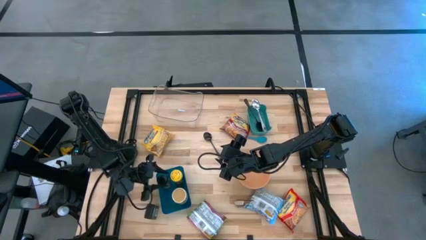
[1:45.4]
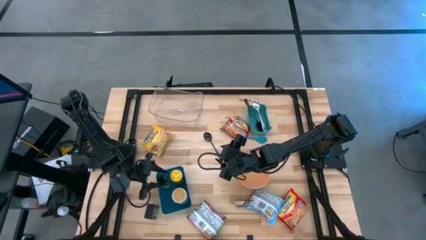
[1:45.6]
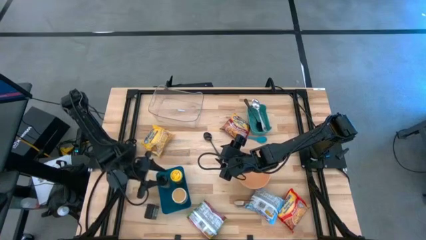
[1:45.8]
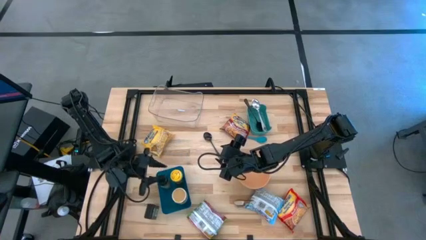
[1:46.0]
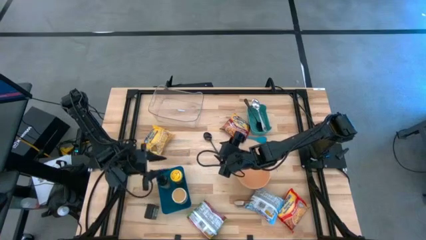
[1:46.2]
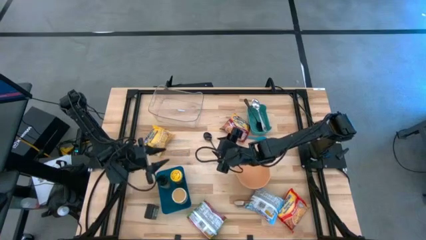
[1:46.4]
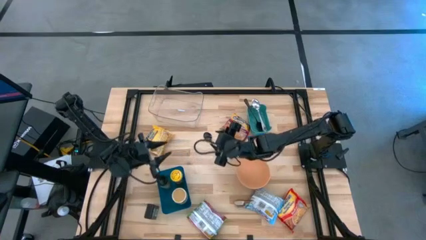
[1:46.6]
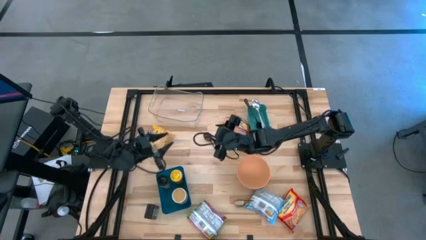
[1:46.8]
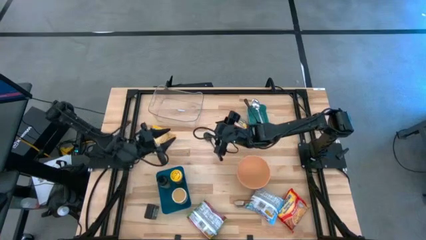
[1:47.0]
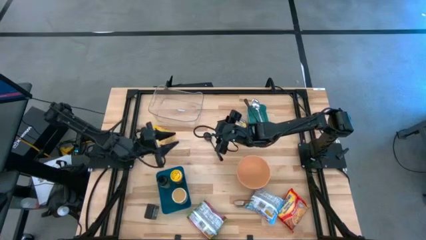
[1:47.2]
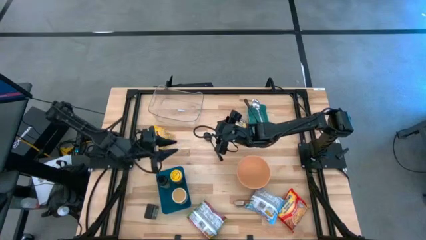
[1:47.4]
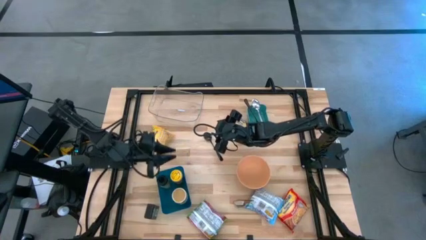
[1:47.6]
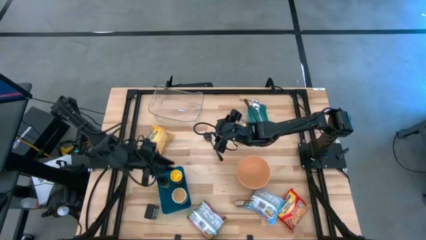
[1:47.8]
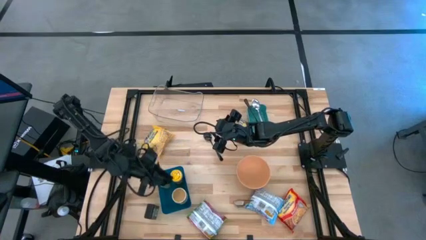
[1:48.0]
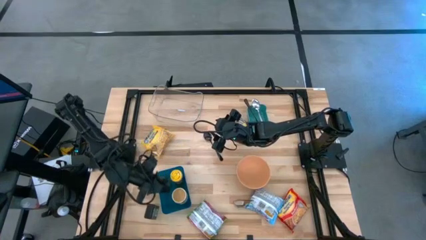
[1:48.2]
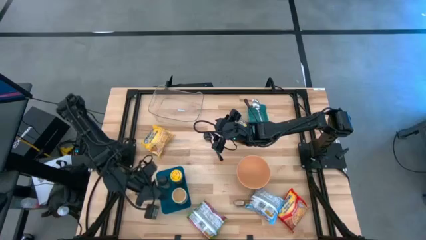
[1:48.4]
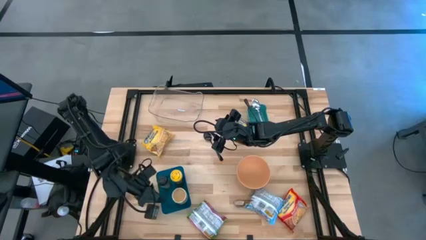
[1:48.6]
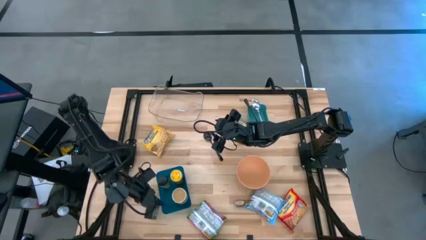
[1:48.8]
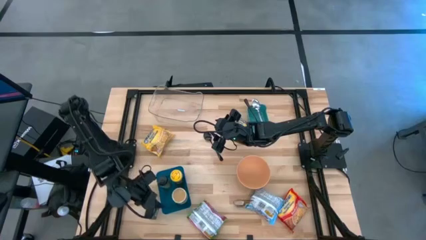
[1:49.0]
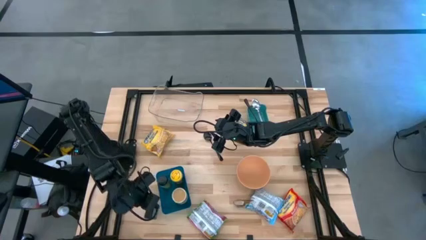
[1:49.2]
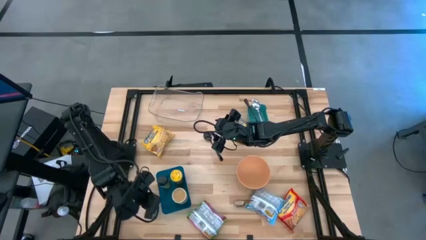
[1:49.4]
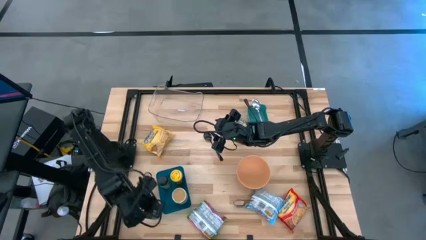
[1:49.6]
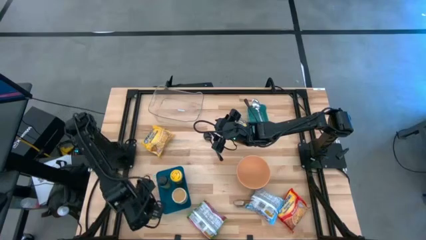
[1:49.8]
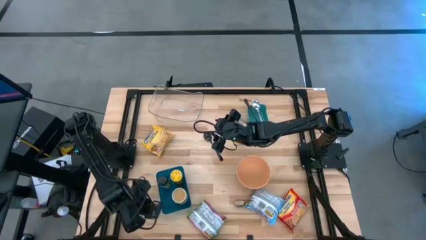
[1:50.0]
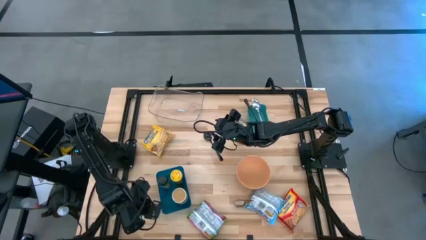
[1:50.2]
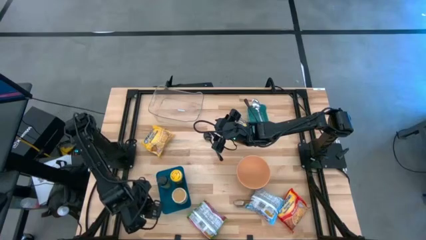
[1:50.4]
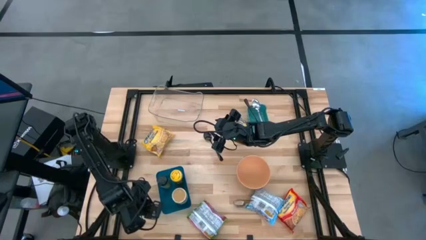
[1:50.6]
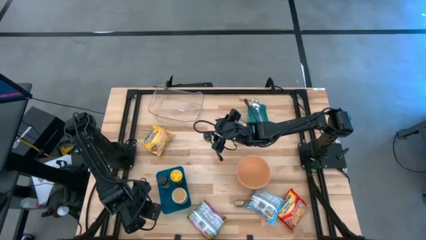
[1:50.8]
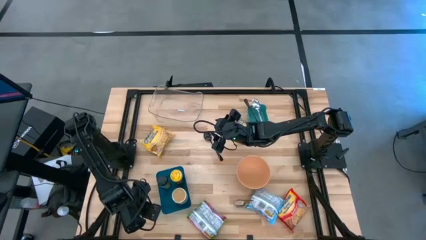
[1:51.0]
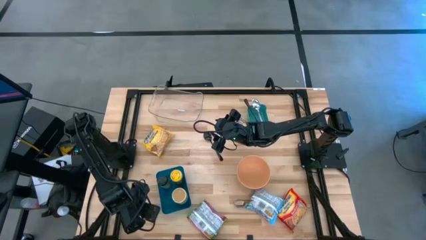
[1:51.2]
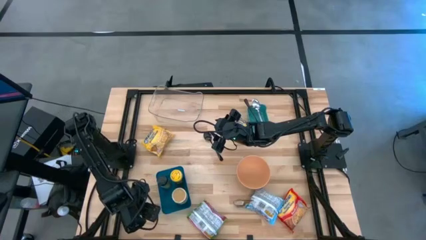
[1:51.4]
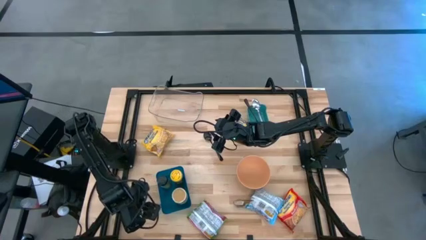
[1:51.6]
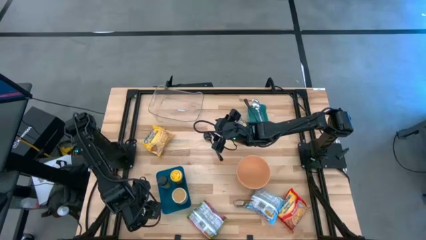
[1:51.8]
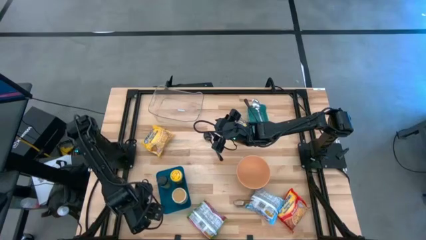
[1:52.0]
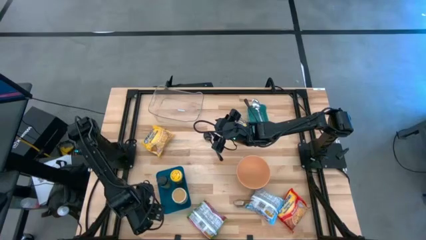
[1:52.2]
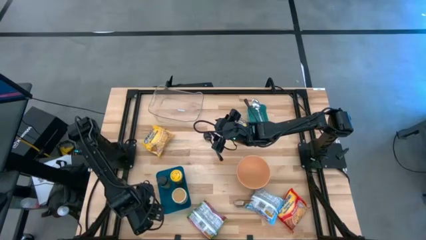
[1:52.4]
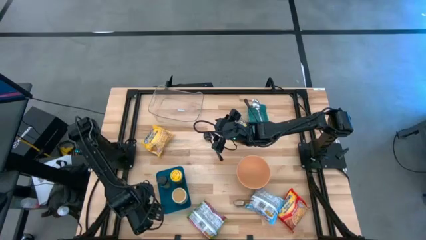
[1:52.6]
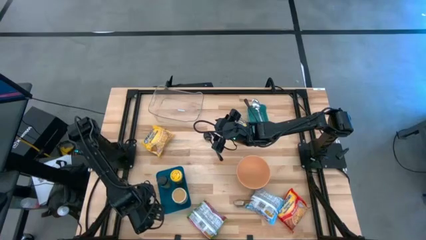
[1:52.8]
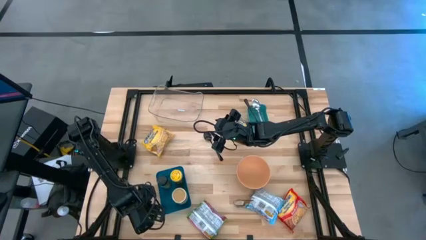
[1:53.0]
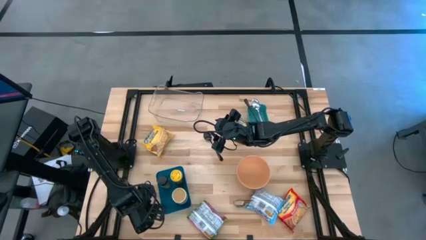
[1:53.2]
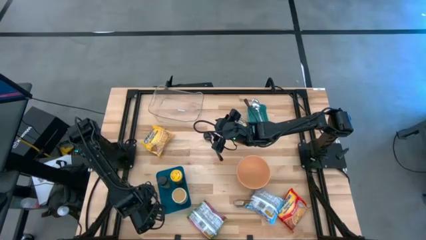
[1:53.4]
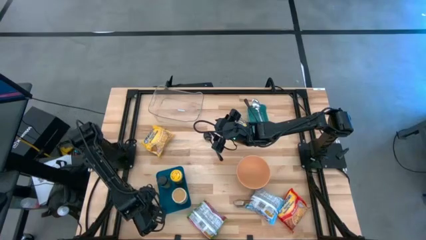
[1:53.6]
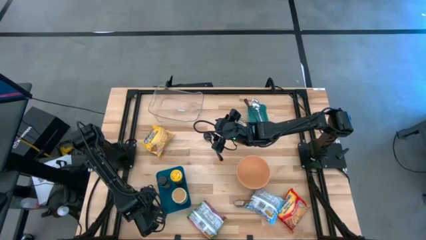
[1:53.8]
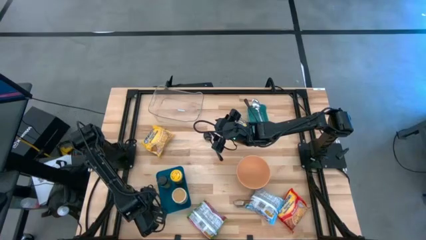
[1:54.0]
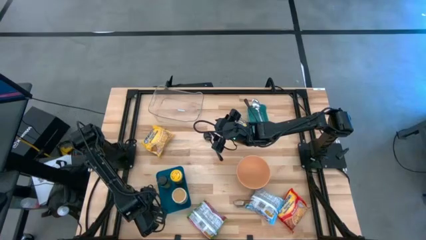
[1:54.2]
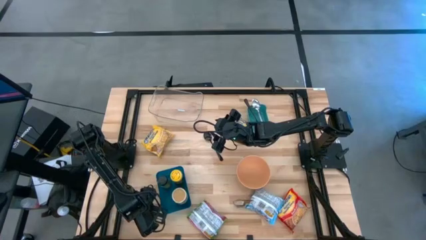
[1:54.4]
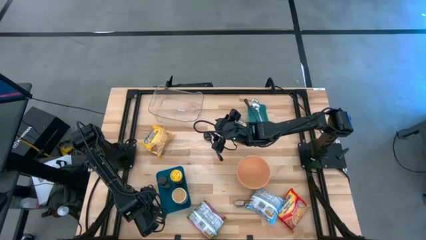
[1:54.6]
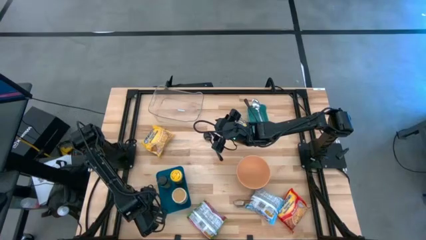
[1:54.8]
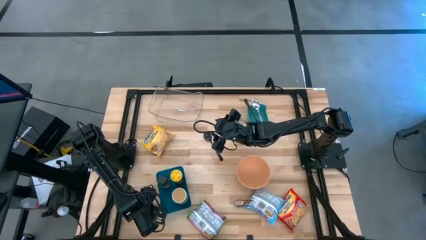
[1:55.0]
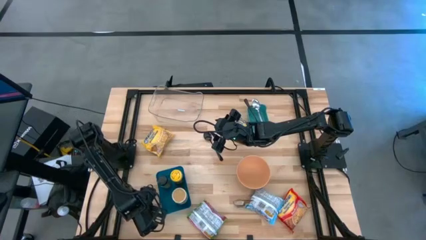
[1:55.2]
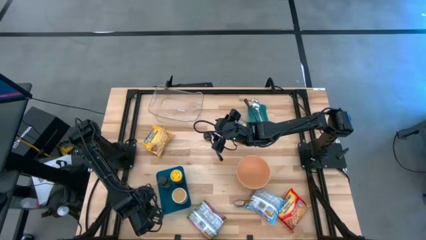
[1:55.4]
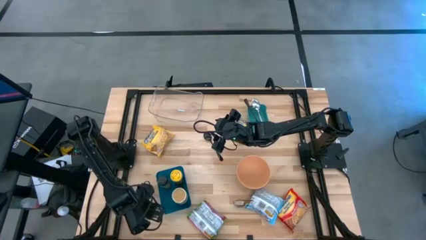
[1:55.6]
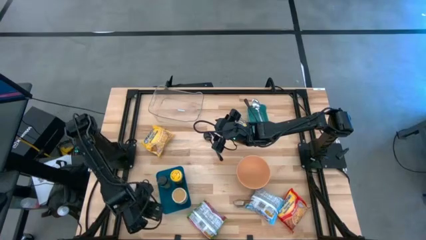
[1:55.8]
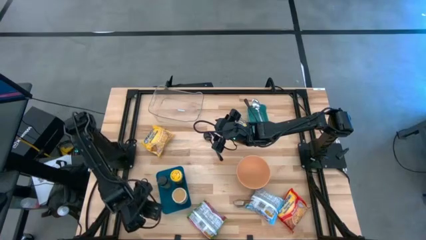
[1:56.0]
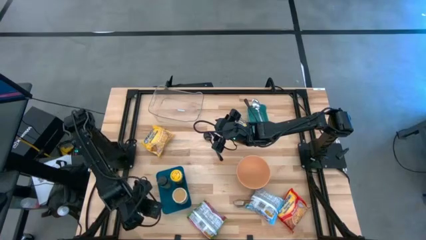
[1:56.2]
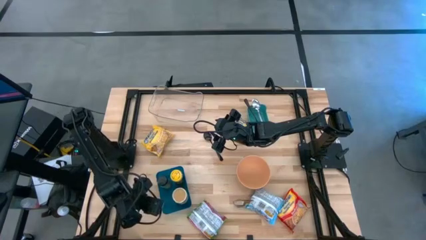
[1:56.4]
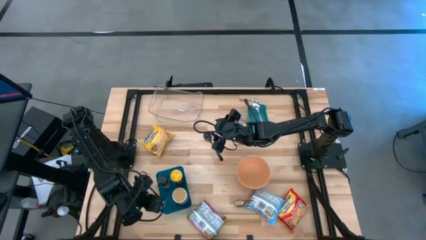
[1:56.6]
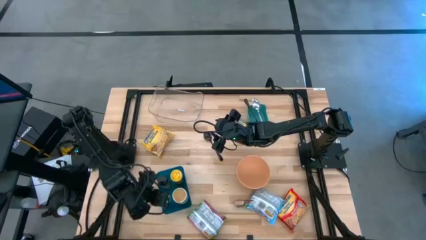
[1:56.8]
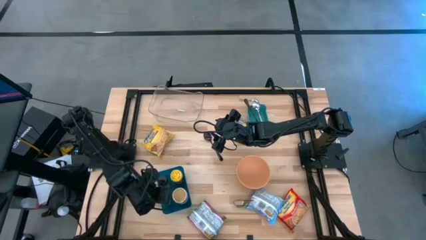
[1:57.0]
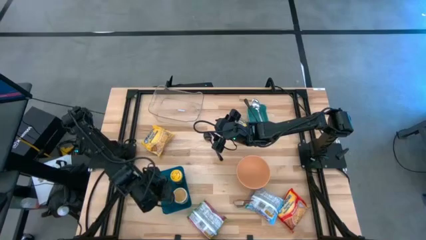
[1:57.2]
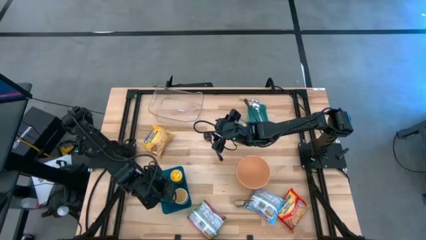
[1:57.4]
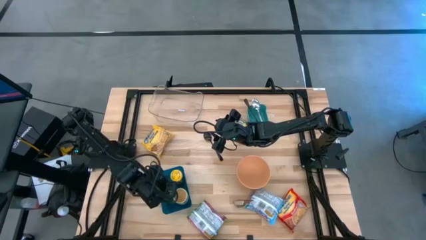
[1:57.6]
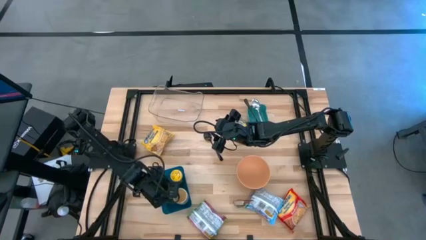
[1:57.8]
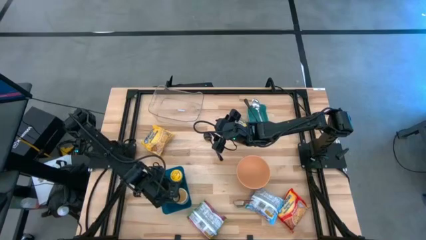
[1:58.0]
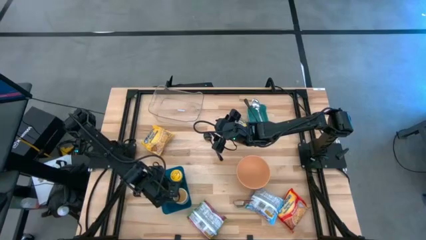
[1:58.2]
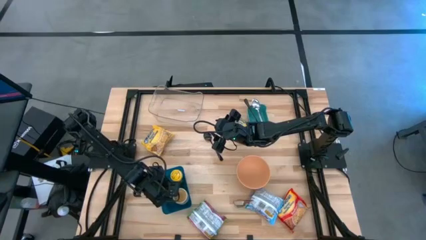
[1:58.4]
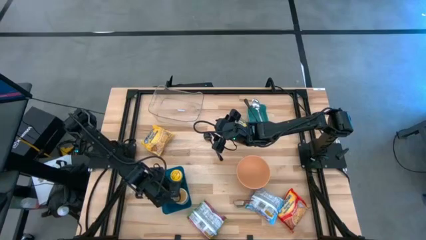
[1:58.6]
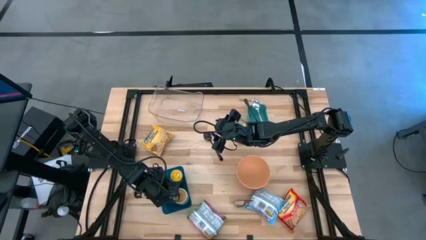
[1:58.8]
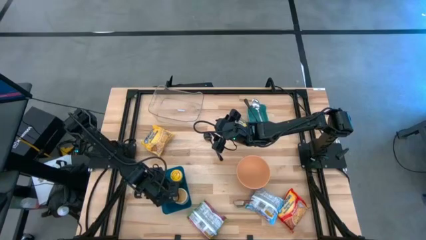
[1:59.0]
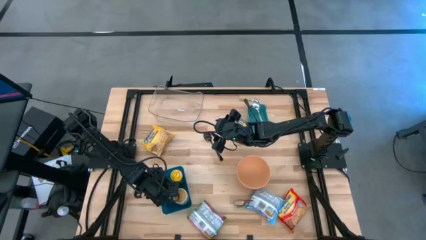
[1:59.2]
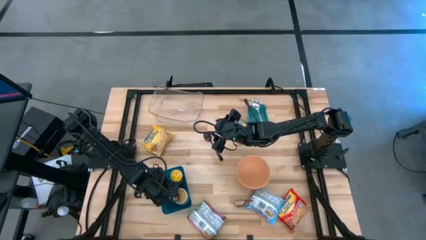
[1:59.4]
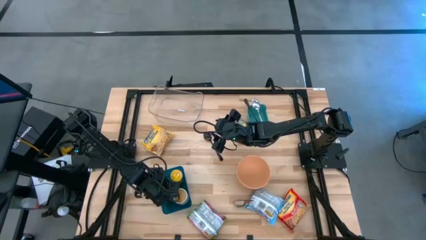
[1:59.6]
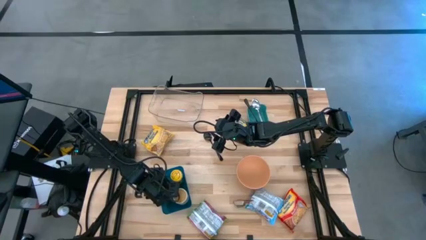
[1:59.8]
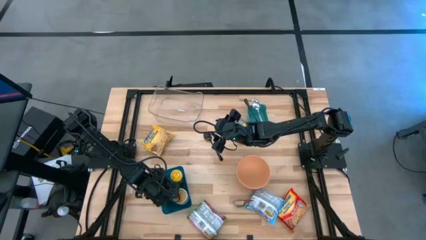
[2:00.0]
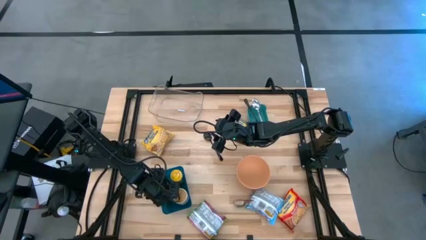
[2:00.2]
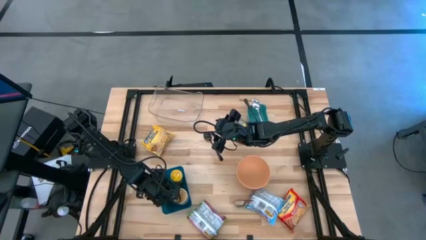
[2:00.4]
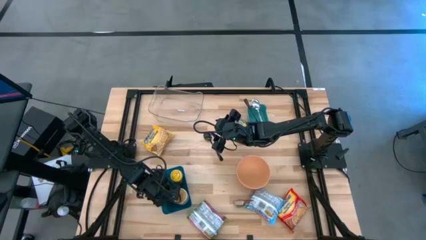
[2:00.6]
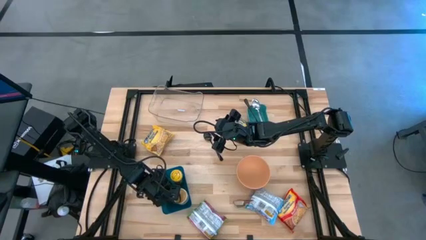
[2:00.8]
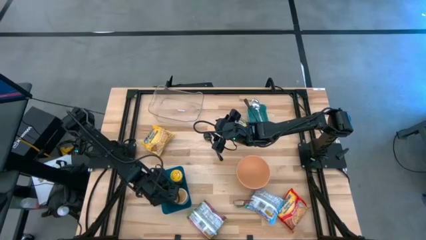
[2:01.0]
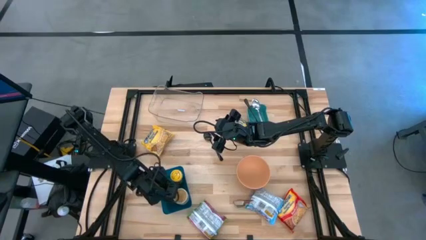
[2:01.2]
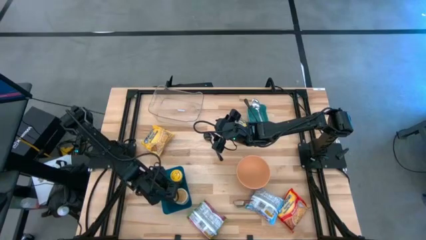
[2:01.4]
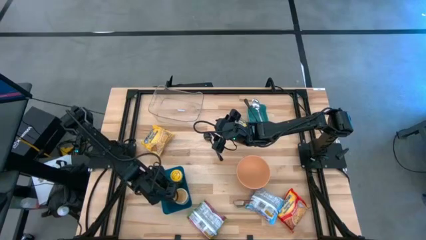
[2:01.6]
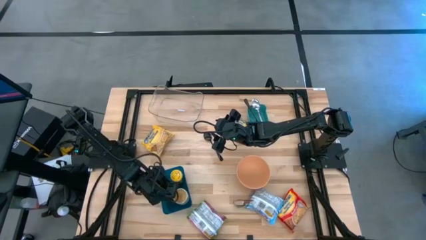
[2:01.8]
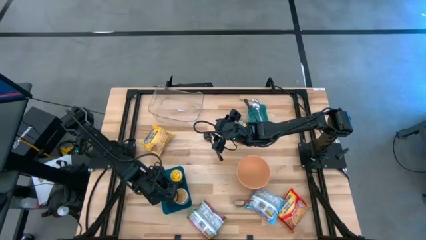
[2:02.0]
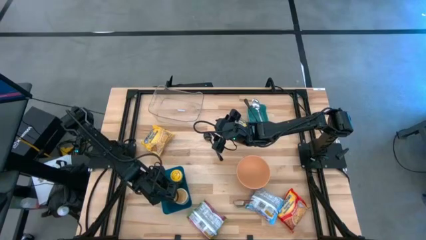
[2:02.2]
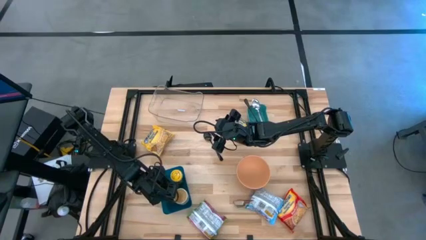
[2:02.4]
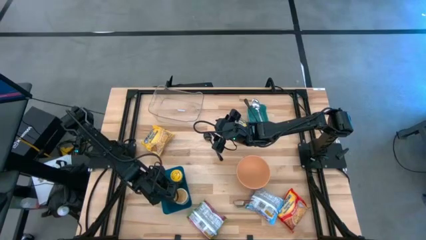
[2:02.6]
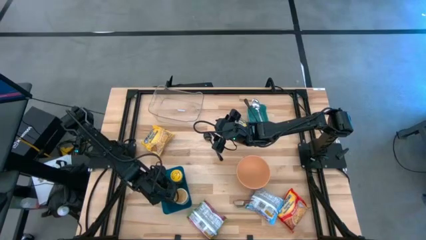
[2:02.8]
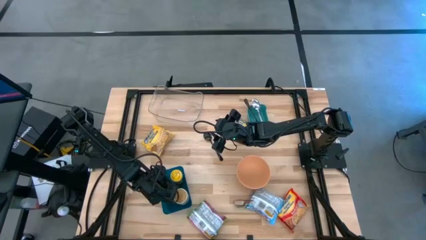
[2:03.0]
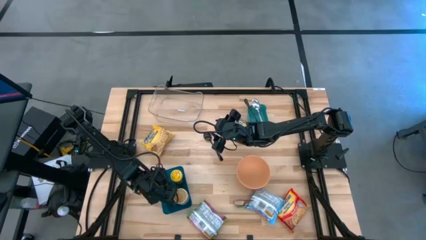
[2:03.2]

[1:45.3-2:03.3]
Task: Pick & Place Food Item
Put the black seasoning can into the blue bin
